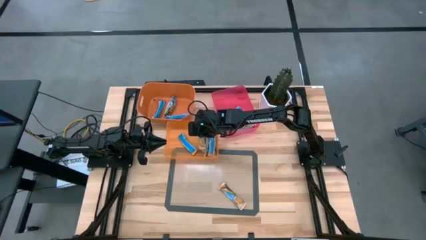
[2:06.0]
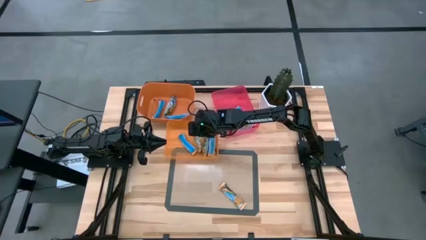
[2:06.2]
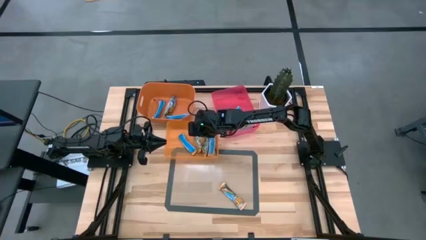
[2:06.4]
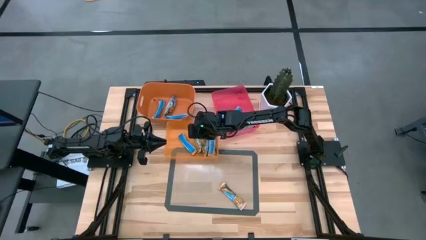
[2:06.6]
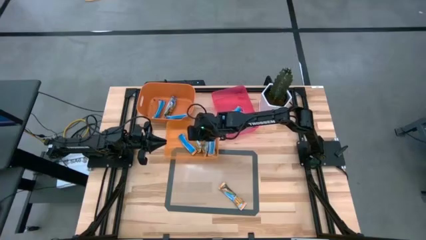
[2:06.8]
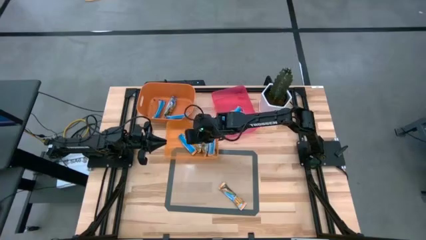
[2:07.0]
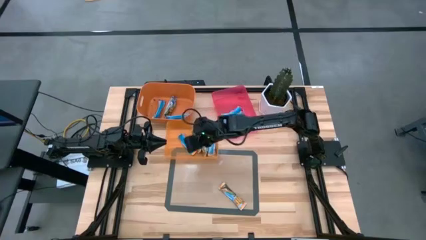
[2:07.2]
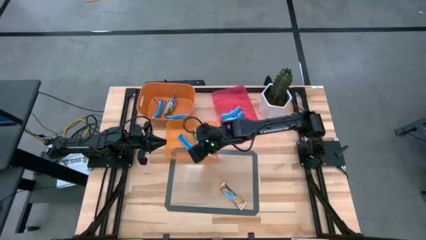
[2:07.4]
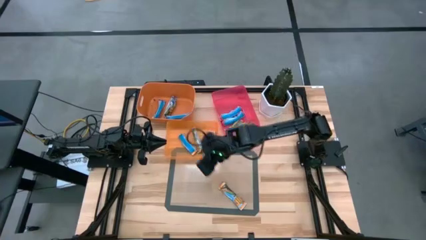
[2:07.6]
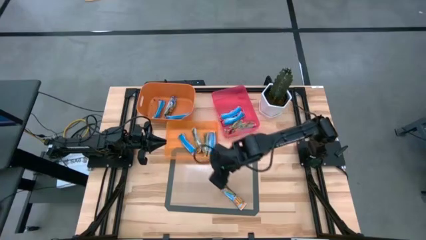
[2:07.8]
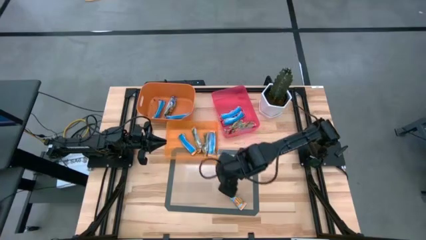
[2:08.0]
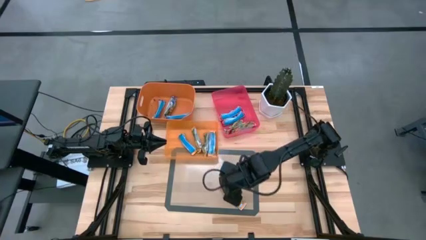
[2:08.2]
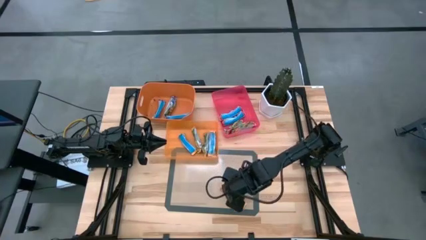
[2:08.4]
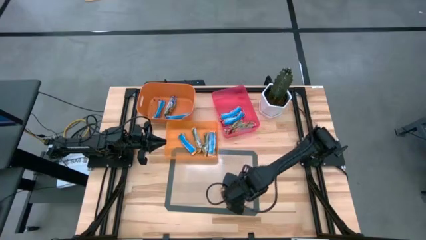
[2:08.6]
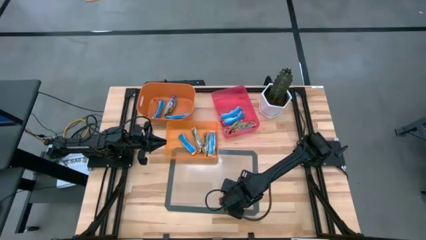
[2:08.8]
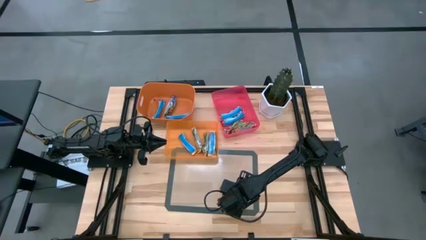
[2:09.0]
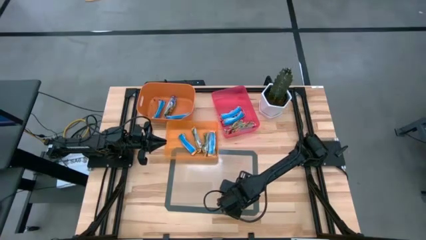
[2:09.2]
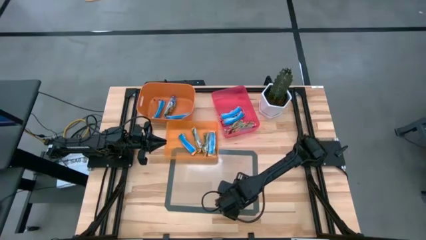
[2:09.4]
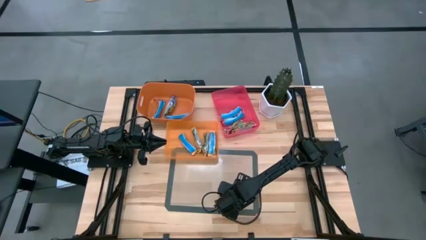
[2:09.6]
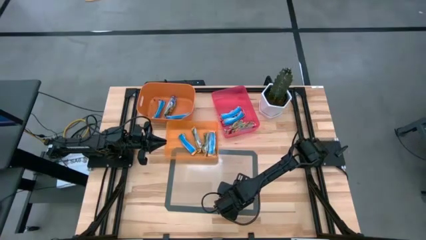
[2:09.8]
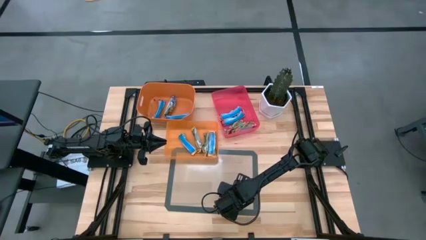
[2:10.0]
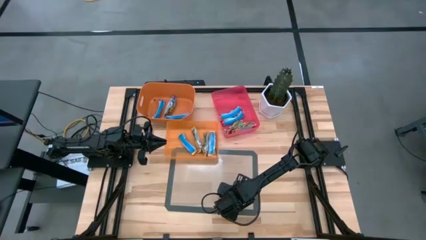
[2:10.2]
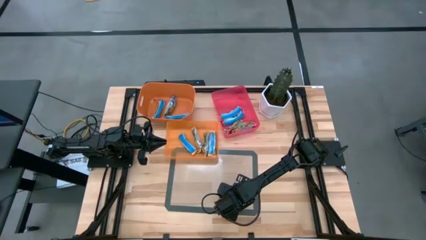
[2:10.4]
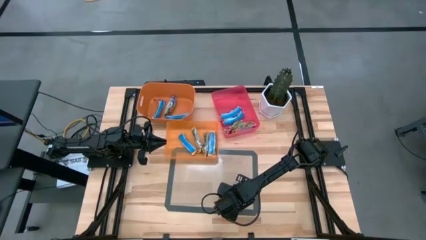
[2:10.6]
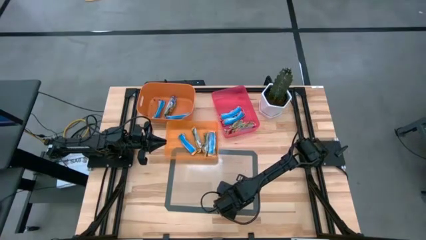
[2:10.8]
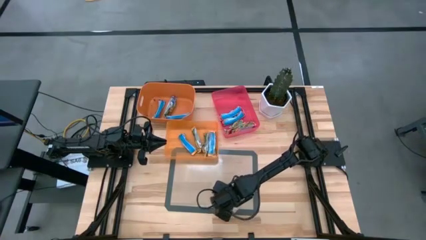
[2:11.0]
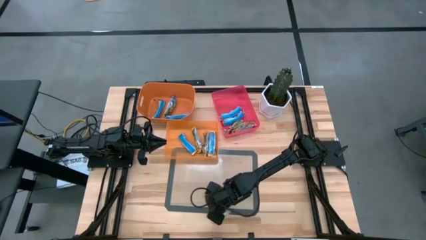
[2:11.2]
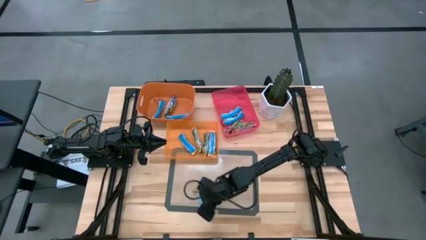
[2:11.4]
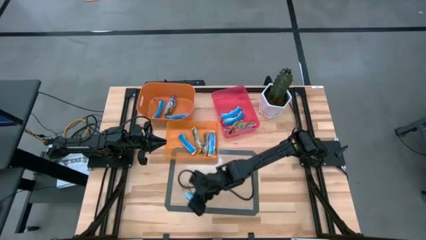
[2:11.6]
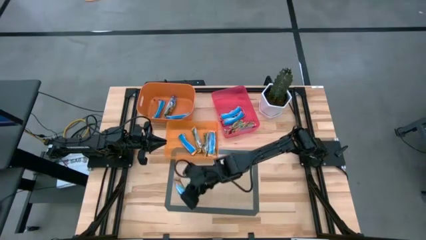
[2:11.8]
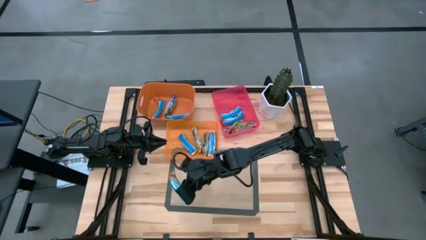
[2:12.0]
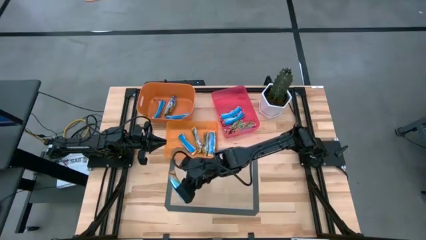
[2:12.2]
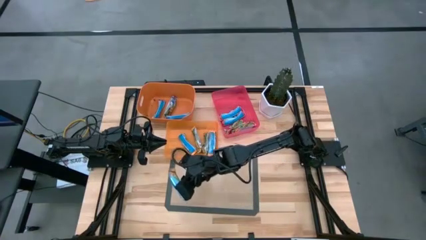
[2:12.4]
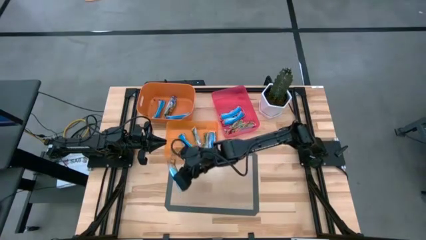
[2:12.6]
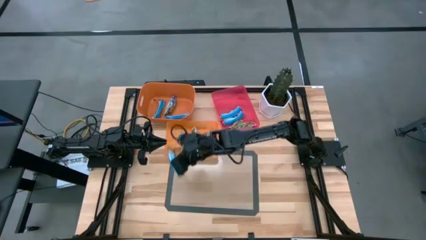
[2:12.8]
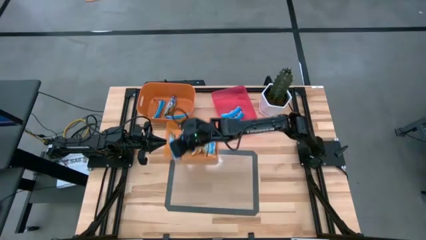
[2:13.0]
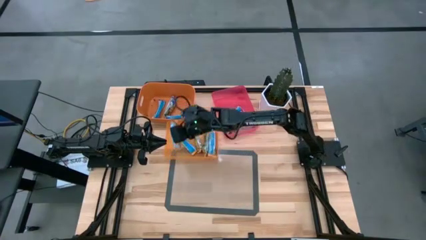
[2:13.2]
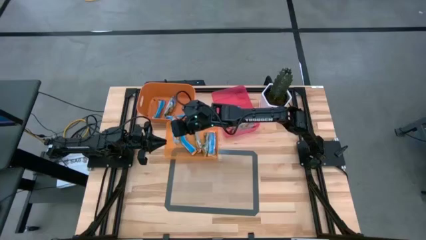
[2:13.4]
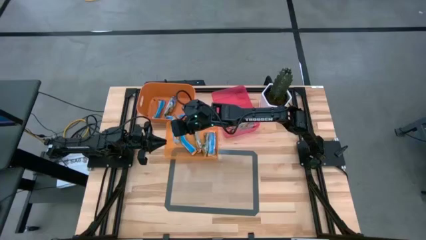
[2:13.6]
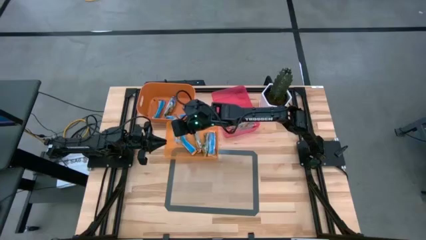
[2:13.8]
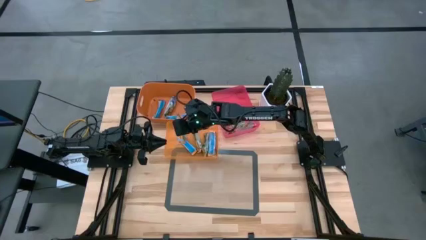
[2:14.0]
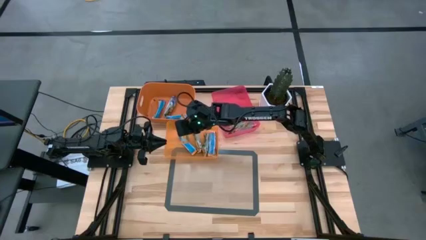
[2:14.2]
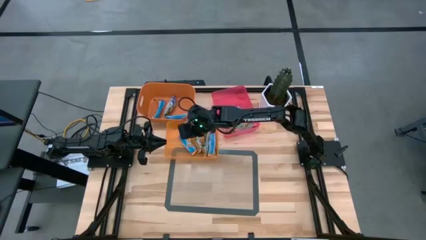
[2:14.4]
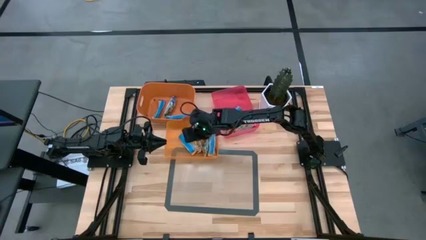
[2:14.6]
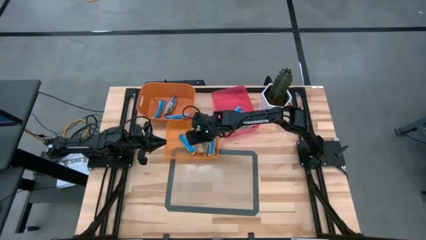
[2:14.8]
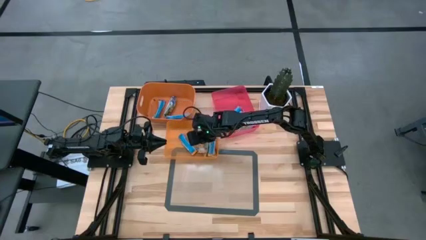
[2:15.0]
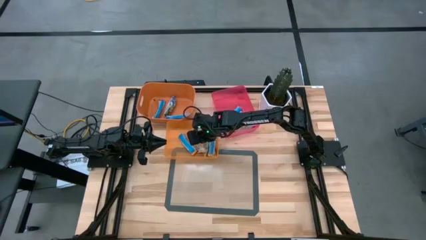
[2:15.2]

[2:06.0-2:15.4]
Task: Pick and place Granola Bars by type
Put the yellow granola bar into the bottom orange bin

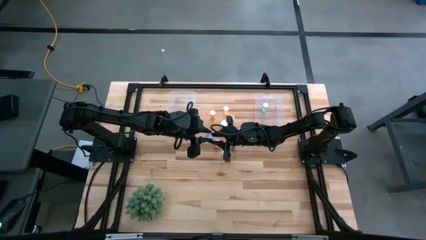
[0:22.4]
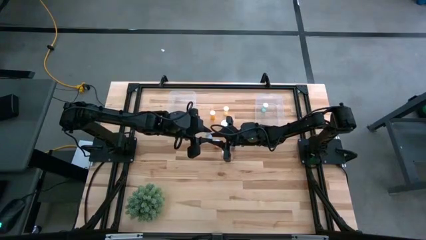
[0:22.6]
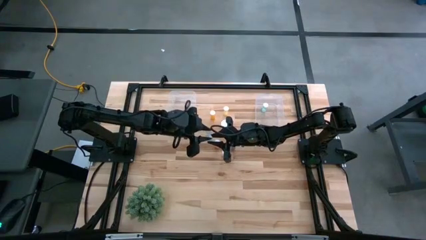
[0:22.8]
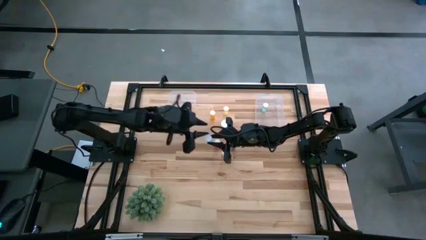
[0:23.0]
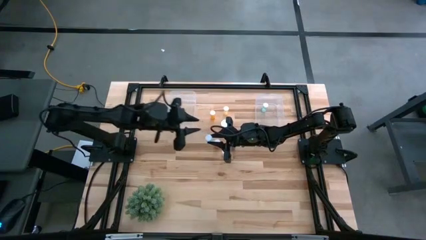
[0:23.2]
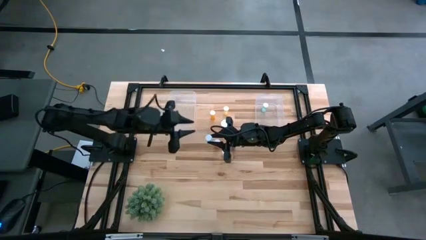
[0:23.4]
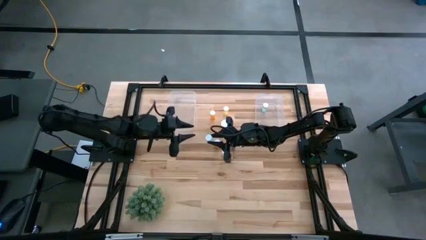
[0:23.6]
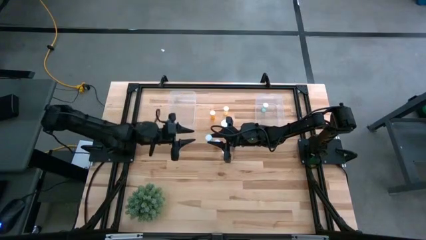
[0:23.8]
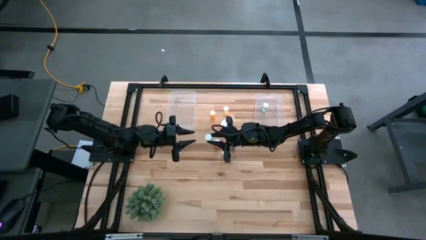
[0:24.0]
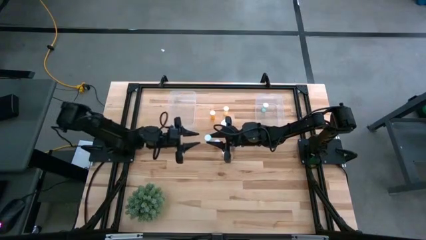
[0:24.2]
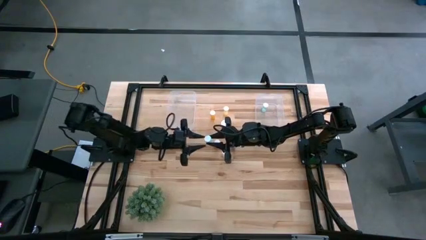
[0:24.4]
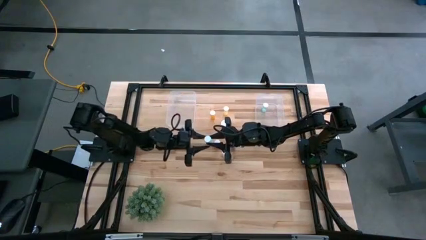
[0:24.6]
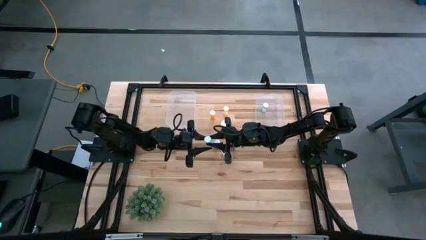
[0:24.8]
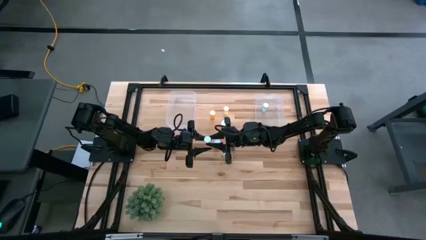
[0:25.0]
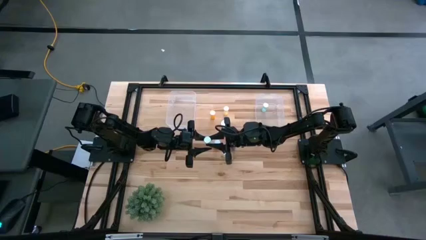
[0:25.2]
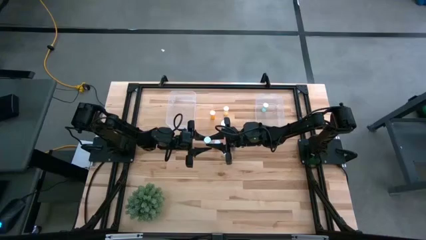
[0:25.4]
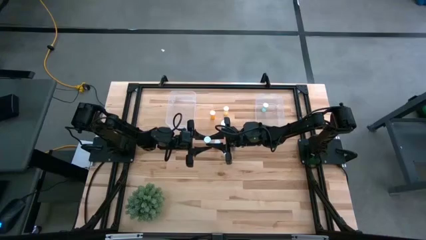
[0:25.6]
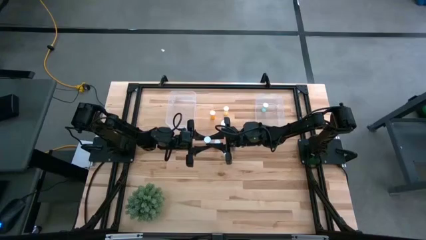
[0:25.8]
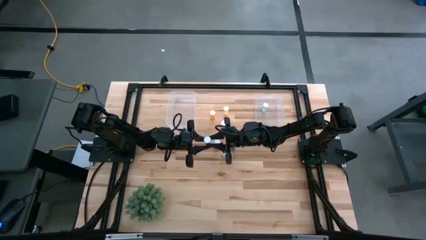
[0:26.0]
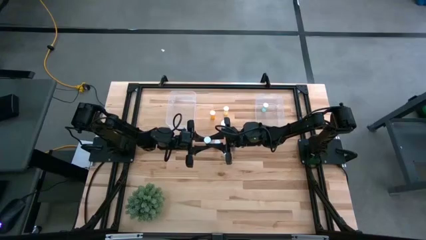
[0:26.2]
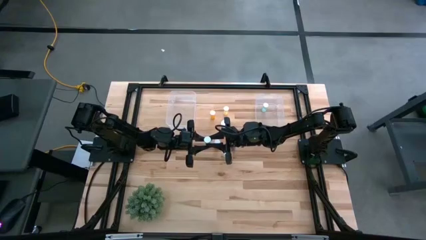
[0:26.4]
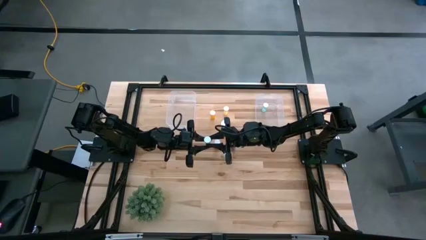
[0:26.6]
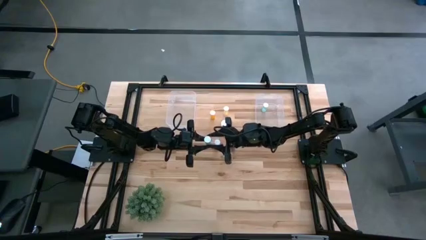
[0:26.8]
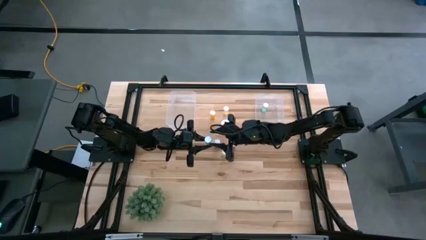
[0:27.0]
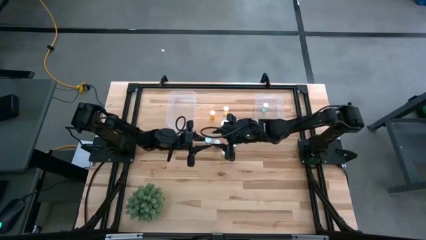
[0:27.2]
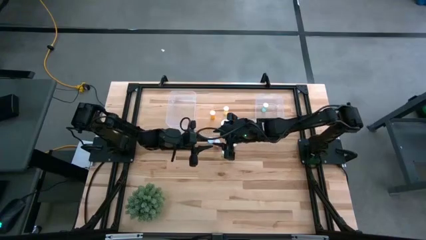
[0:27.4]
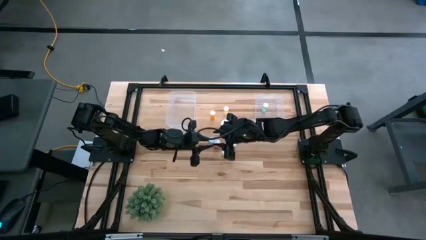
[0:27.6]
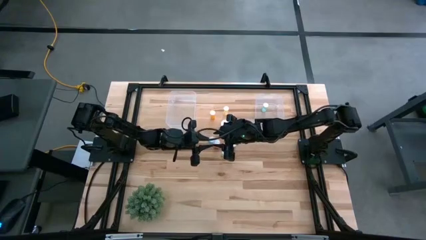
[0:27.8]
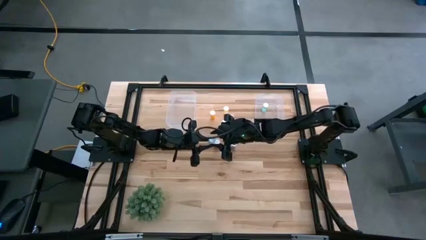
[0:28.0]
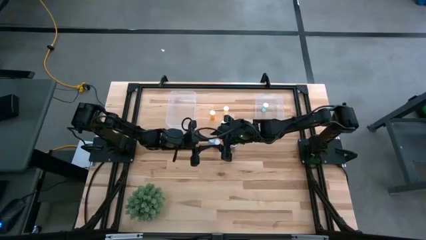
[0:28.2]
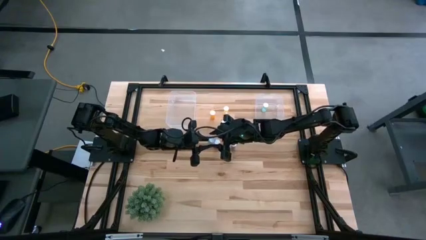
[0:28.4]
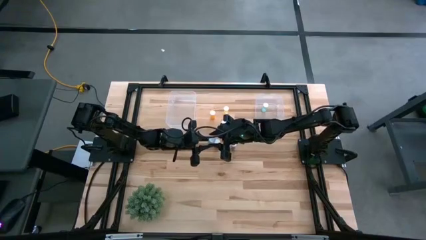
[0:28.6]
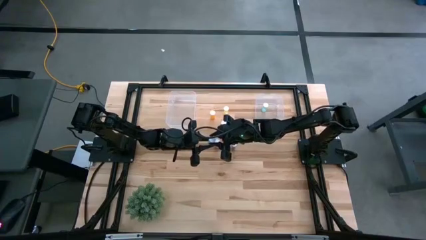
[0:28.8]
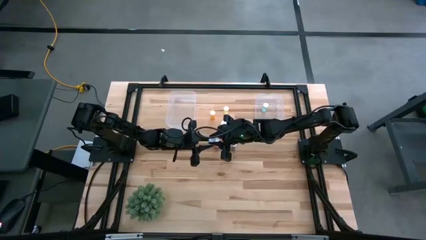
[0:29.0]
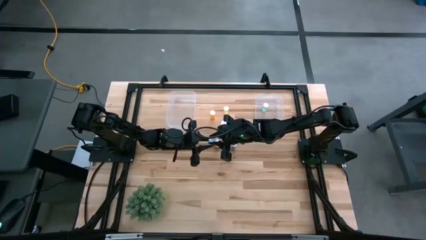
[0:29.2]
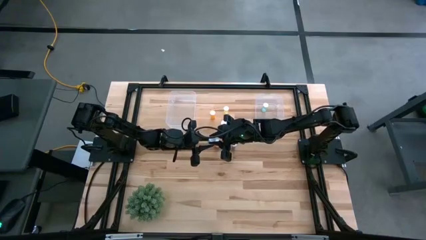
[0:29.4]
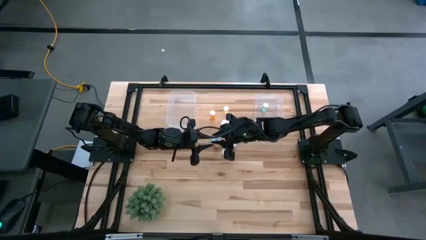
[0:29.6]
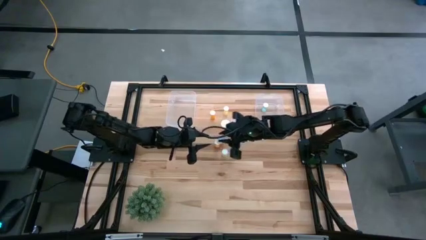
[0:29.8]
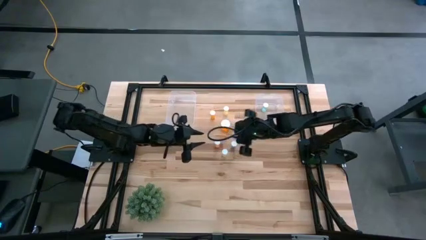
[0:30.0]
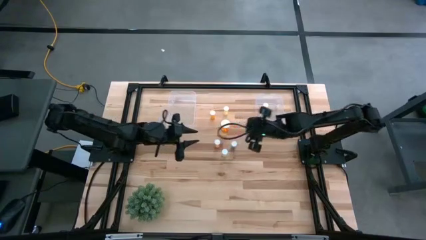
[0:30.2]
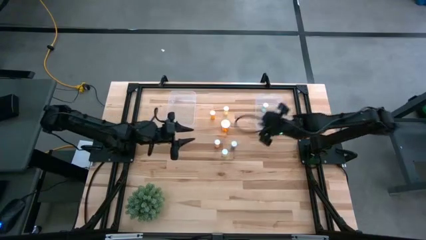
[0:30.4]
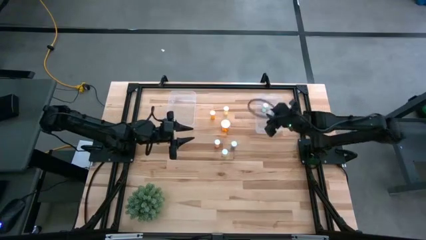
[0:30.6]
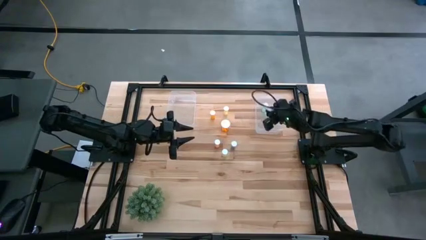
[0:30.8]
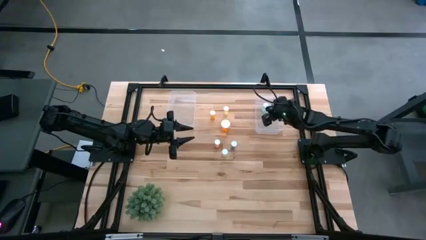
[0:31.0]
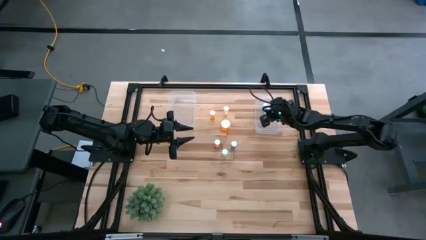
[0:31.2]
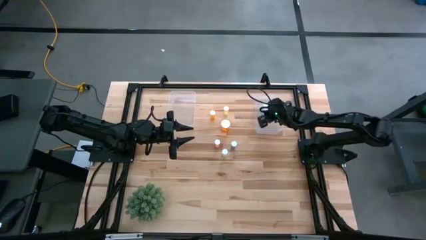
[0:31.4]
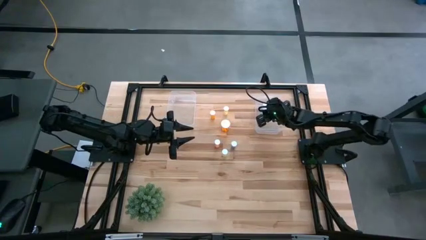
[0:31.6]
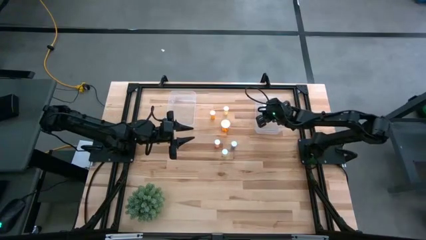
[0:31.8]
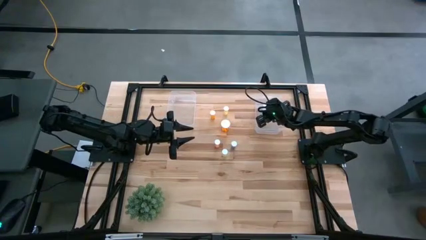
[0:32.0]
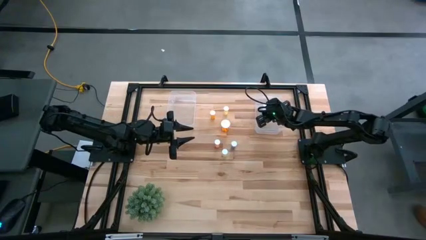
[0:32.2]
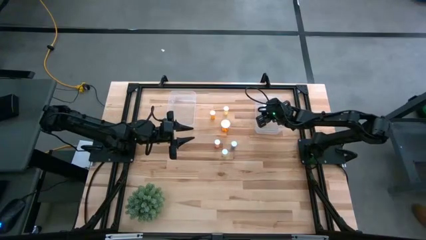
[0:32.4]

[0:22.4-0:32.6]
Task: Pick and place medicine bottles into bin by pill shape (circle, oval)
Put the green tablet bottle into the right transparent bin
